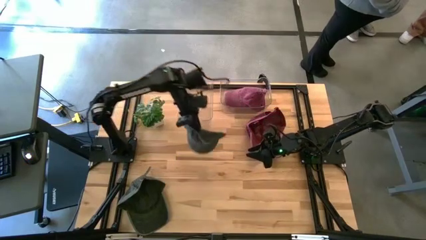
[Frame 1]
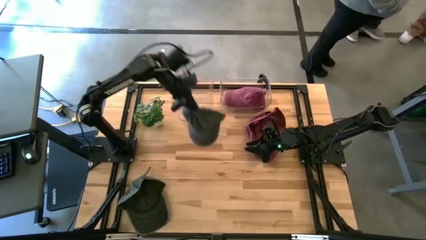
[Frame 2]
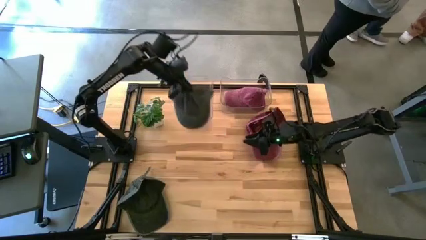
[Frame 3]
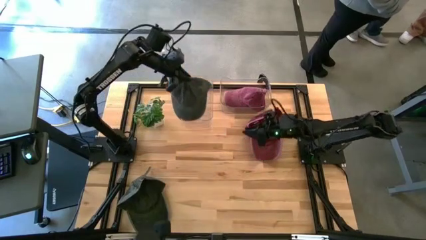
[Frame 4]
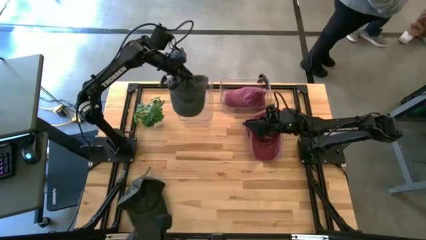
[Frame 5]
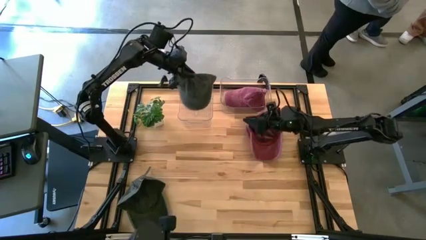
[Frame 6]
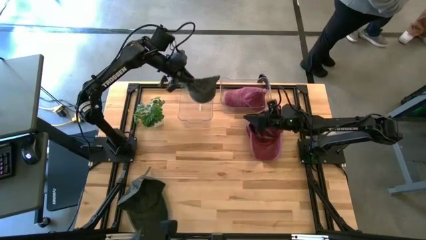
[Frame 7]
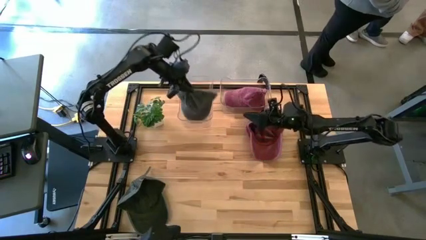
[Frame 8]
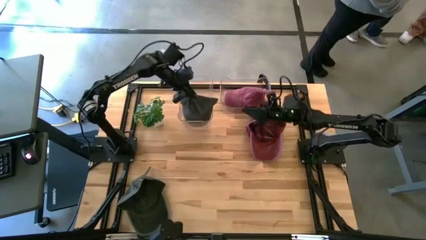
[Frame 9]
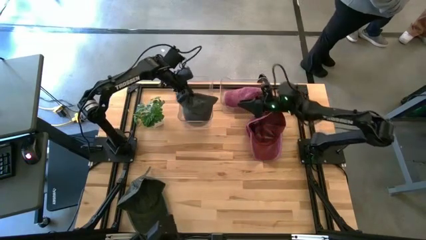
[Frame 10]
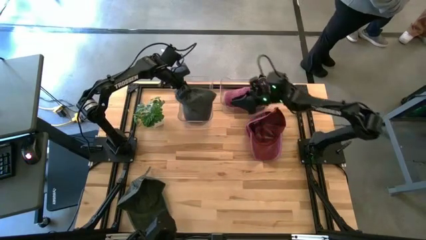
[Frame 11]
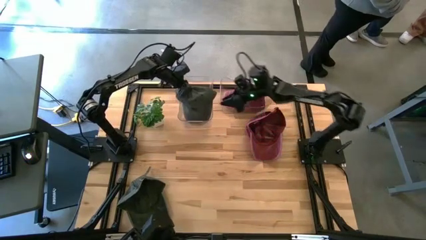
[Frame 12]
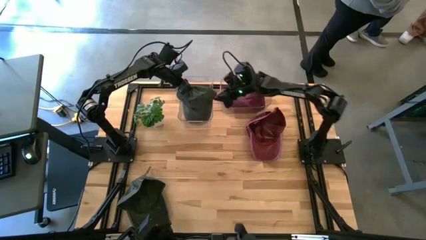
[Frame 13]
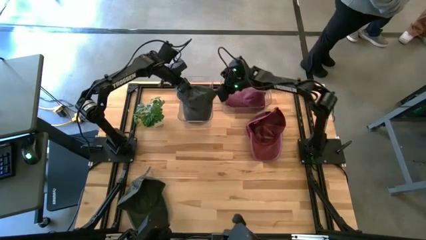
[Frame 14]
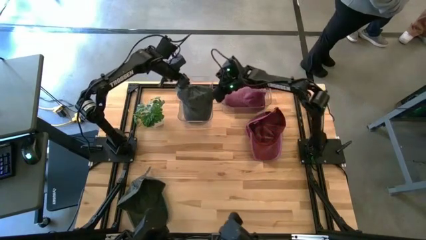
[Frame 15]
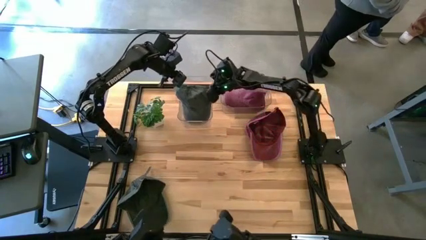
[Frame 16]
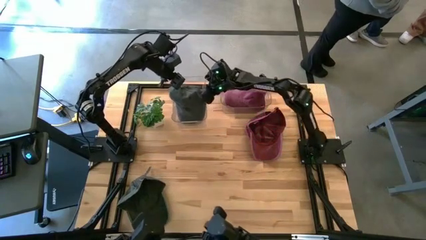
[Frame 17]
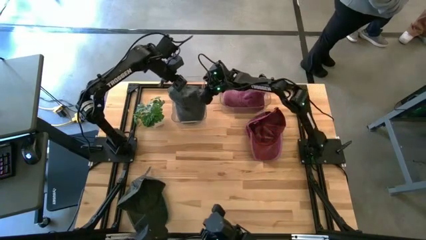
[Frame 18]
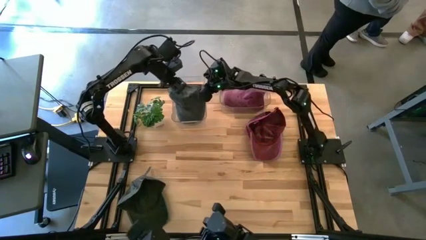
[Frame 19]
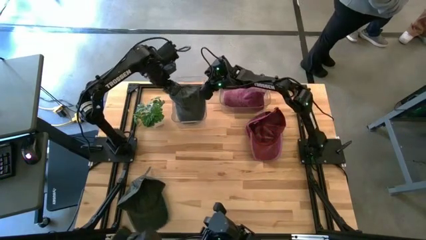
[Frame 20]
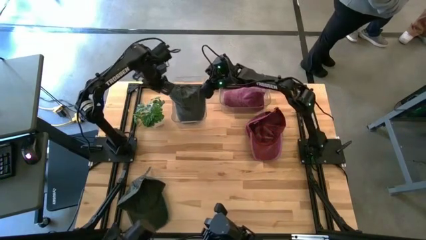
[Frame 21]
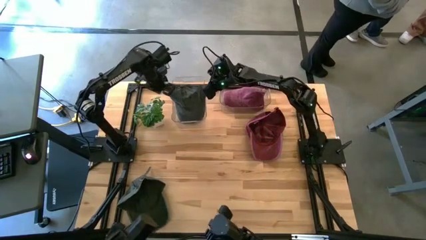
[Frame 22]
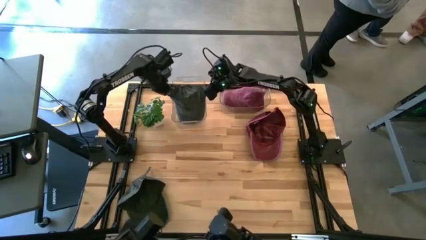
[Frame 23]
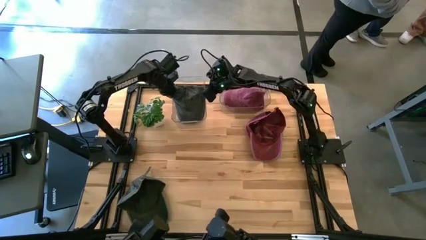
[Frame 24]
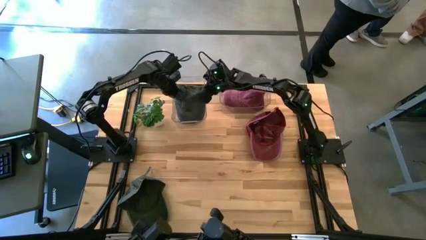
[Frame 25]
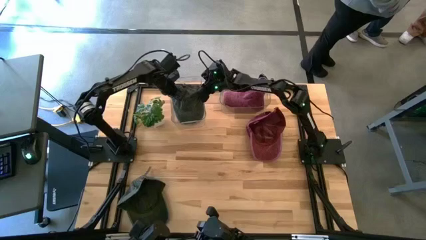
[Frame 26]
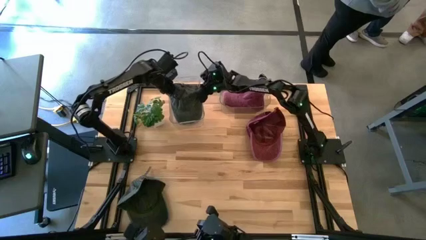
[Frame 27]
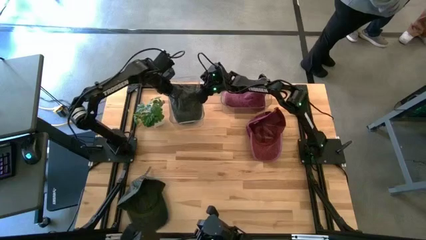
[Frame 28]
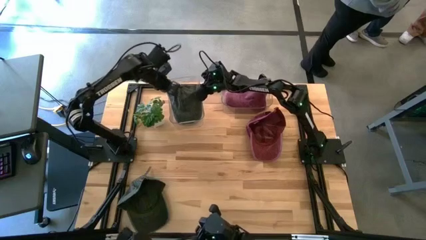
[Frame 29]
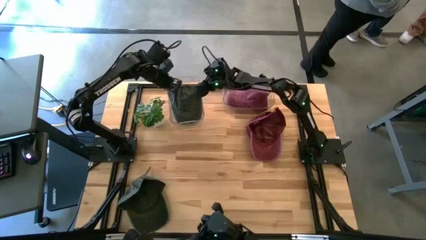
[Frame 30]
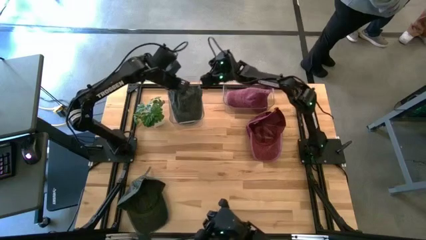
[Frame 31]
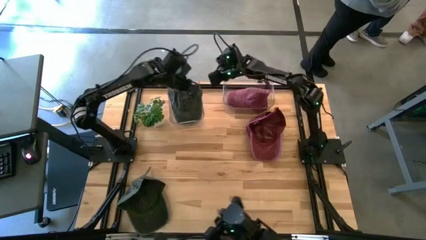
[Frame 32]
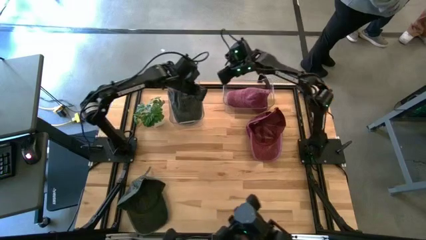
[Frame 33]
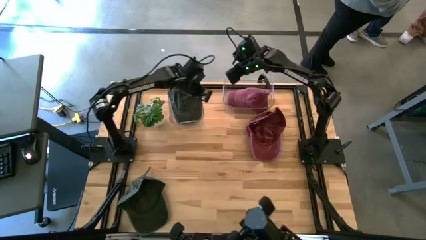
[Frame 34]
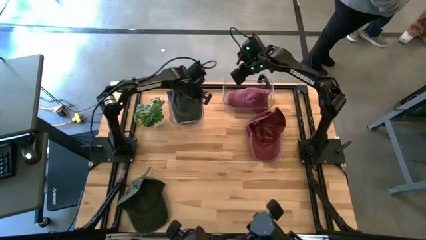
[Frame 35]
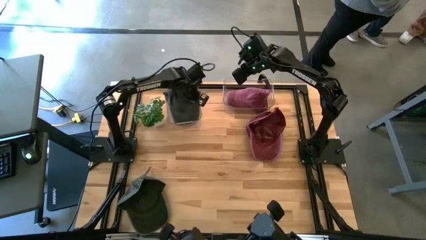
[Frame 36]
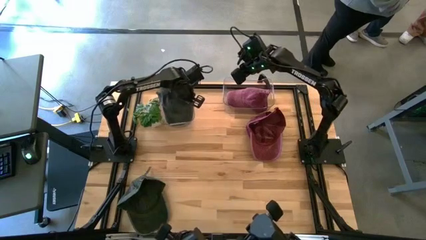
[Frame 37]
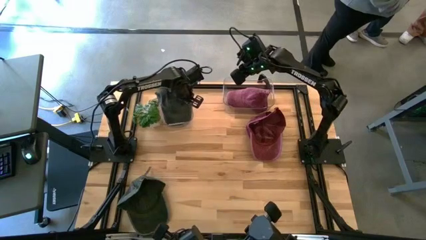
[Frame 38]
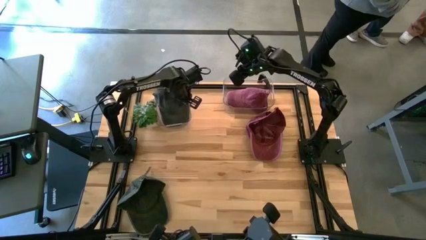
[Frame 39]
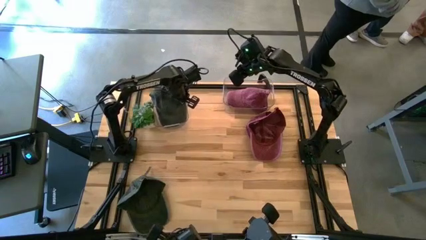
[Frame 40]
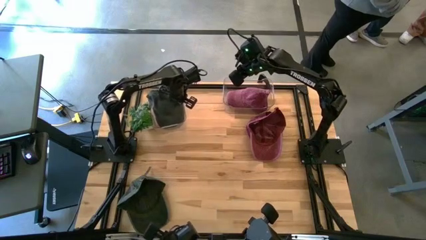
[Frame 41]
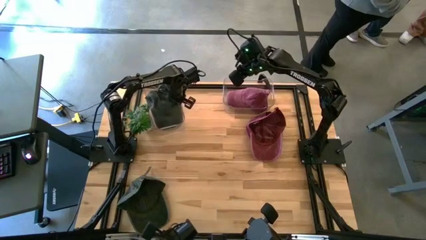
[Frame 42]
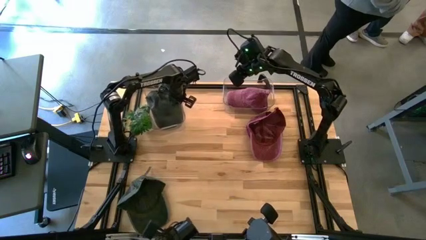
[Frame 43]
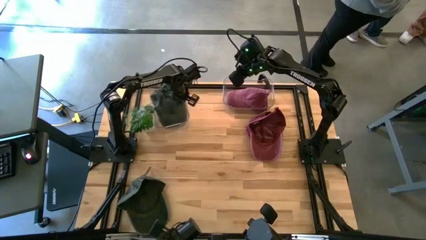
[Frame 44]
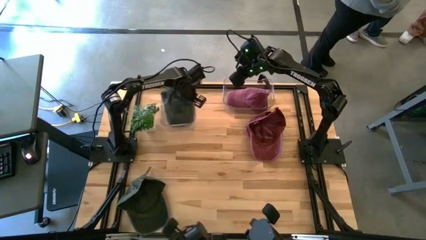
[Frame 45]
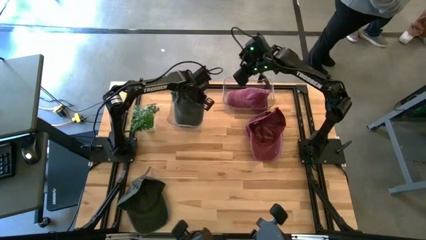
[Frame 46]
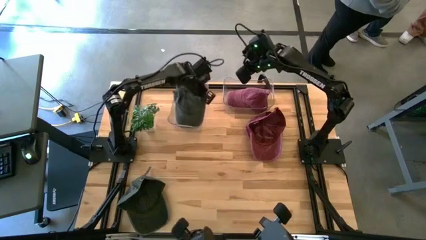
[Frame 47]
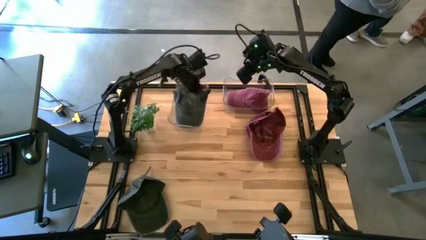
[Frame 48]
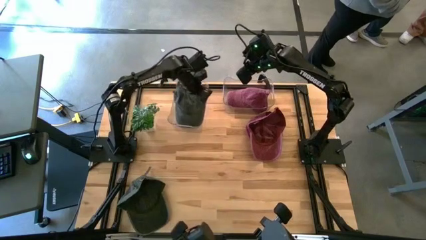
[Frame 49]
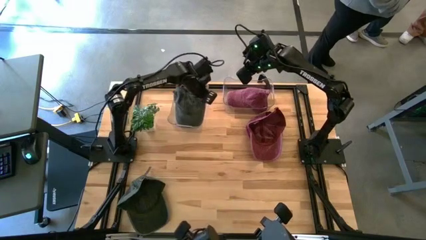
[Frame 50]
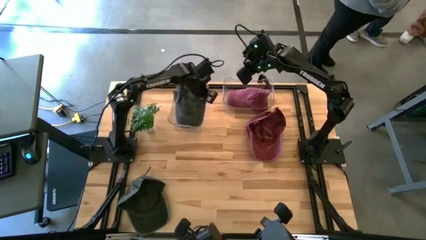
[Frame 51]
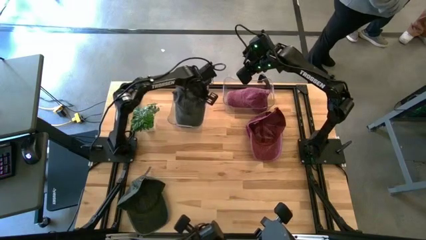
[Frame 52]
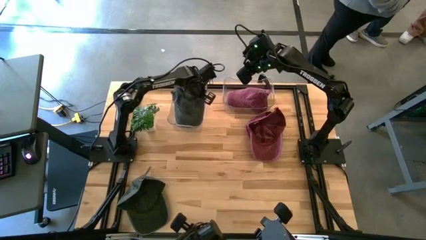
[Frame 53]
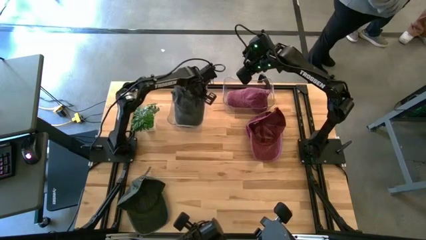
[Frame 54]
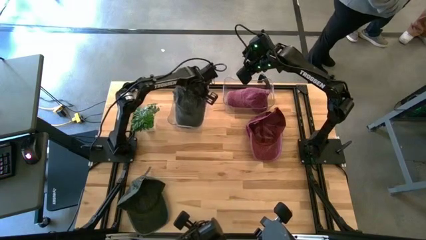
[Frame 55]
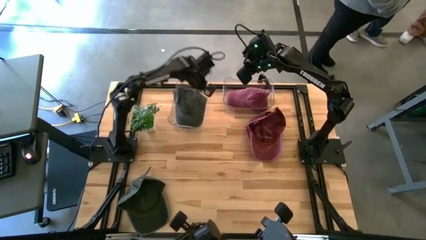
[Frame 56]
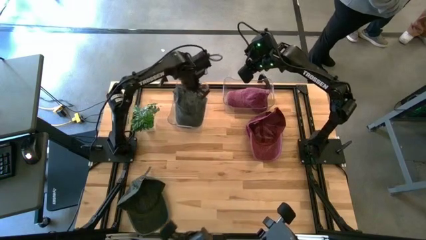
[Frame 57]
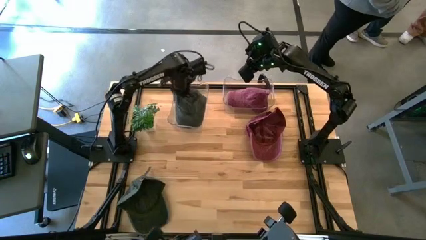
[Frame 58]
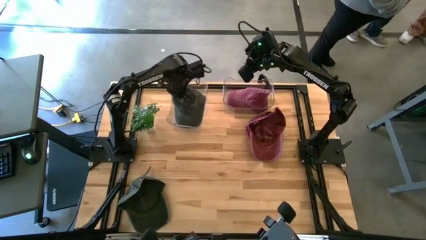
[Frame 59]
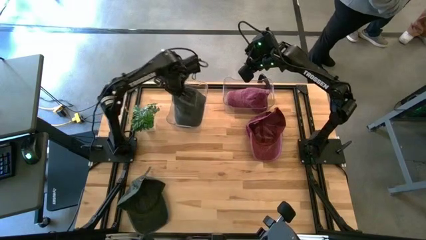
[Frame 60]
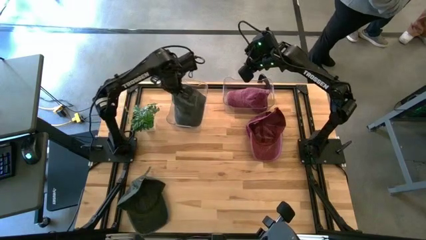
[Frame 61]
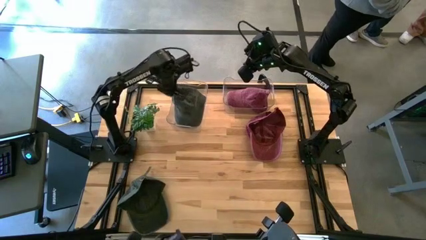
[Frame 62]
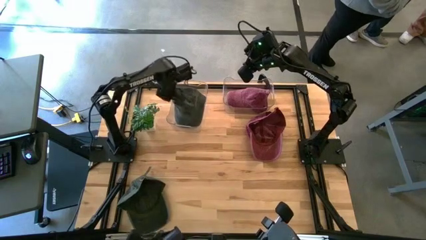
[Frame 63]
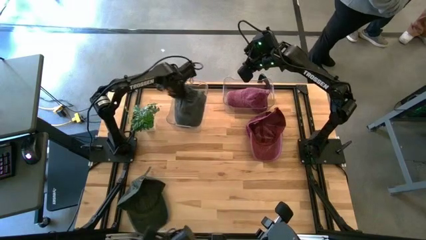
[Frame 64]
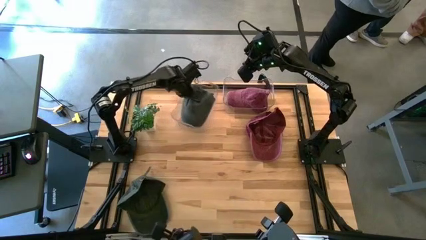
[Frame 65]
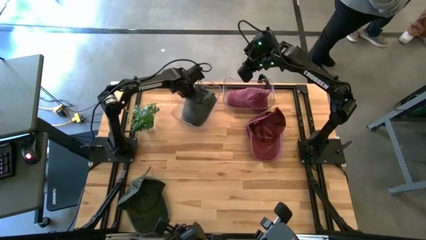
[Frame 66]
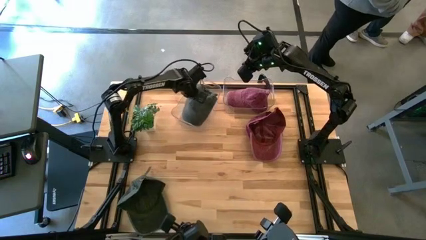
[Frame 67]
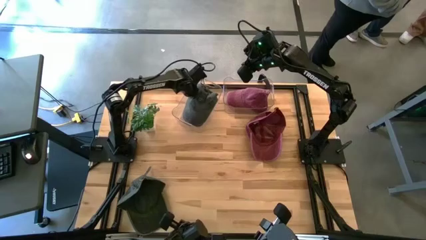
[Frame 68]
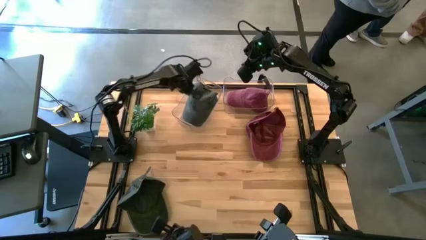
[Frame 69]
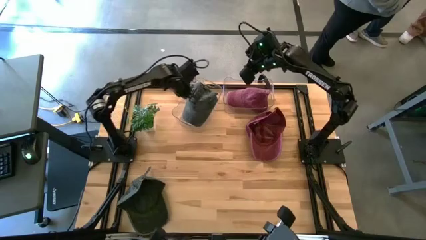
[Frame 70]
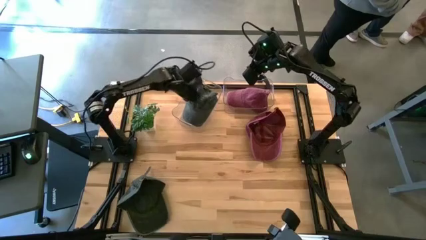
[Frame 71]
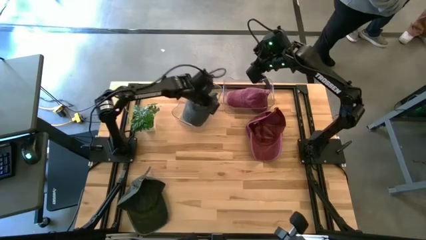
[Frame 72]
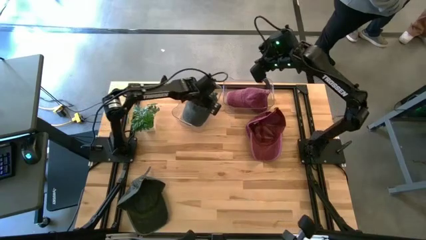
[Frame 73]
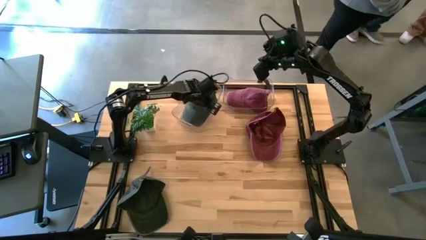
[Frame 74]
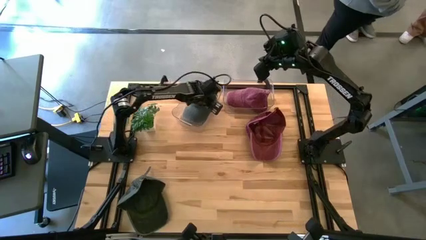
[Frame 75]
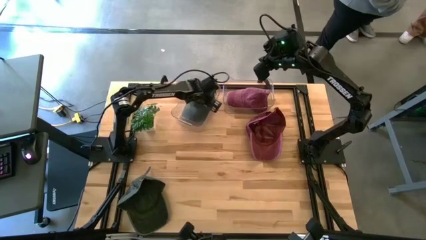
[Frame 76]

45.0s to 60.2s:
Task: Pick & Place hat
Put the right black cap into the left transparent bin

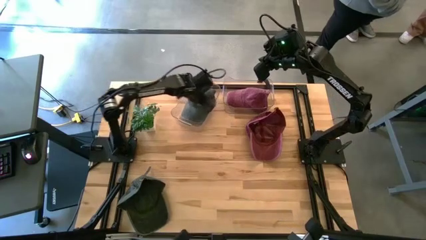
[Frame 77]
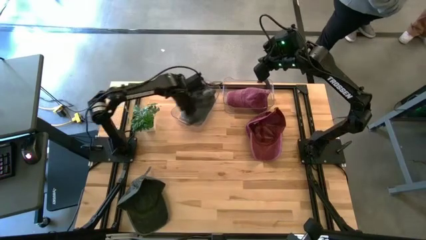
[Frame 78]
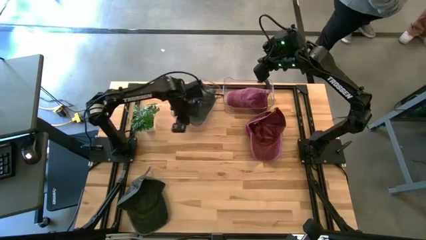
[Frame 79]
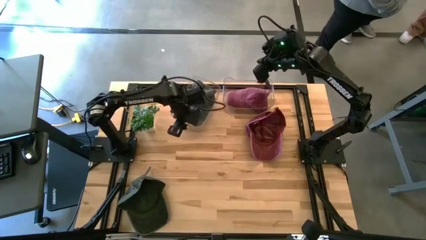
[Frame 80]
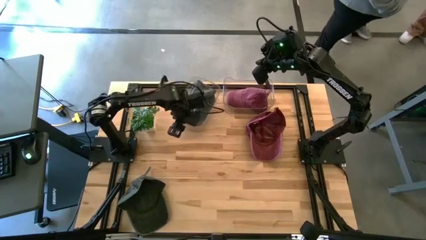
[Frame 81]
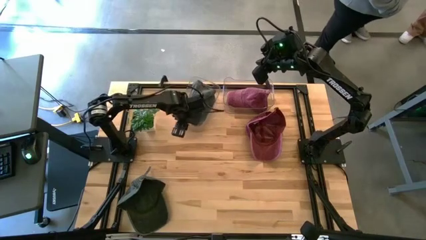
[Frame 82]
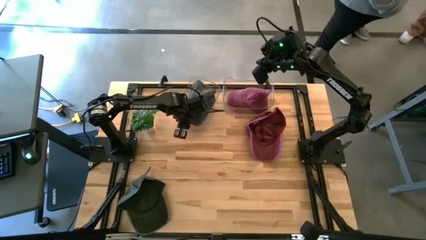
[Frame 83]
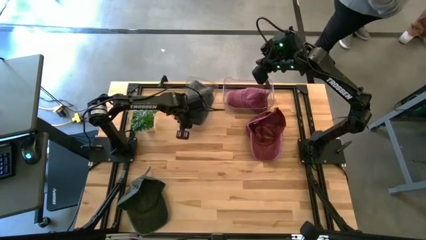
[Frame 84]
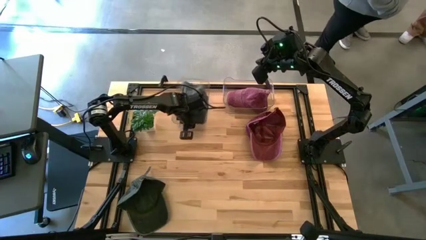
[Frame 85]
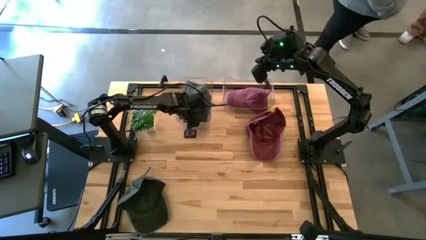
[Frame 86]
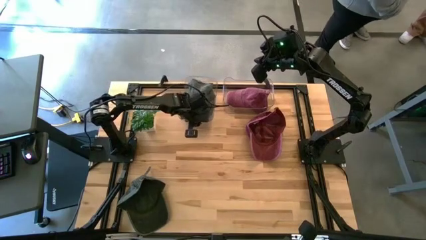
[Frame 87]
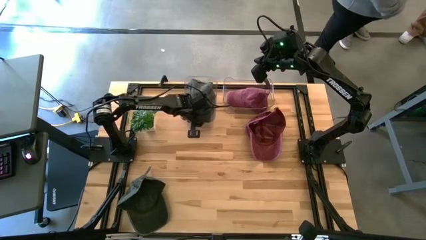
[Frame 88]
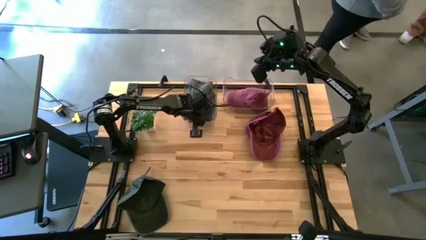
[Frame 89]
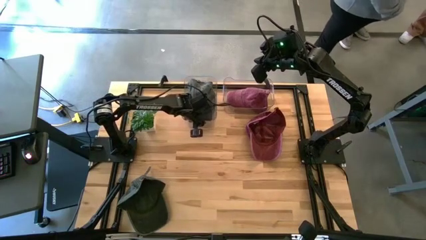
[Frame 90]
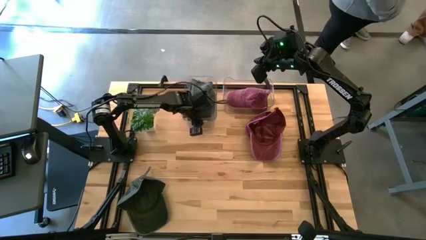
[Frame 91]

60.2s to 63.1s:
Adjust the left transparent bin
